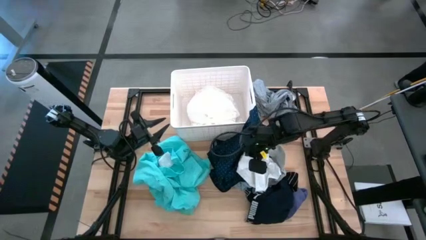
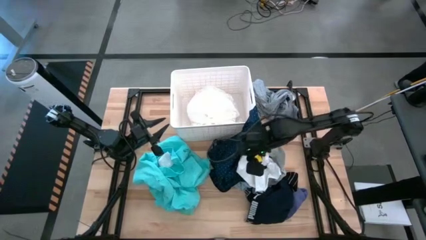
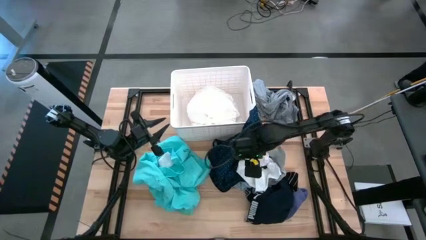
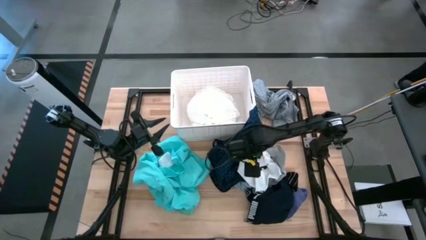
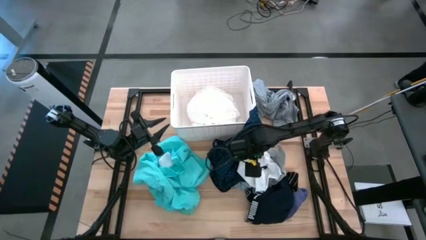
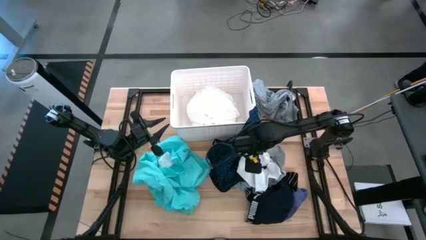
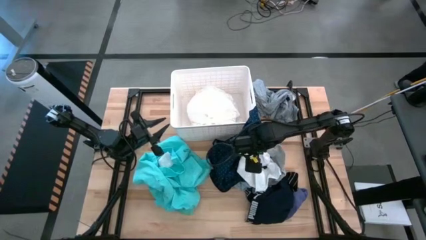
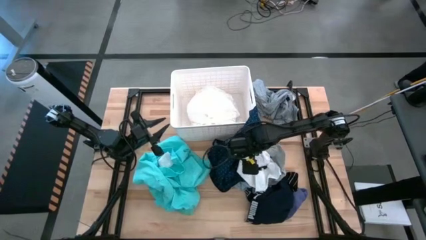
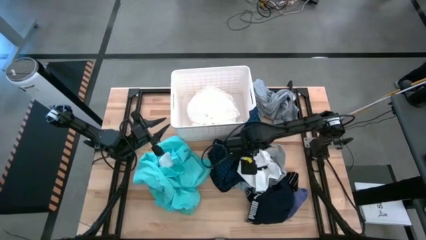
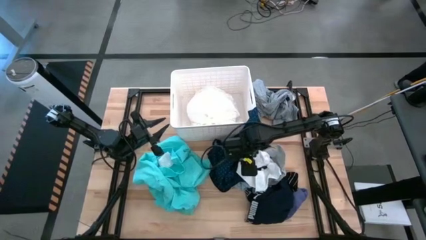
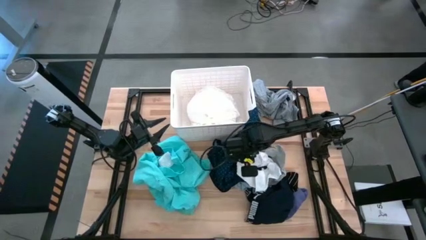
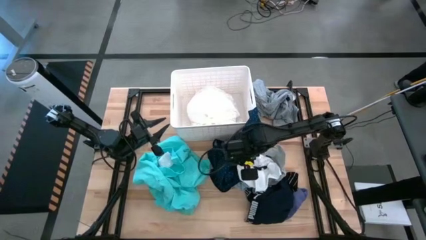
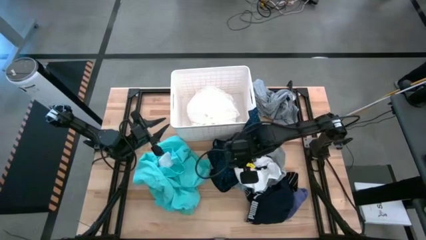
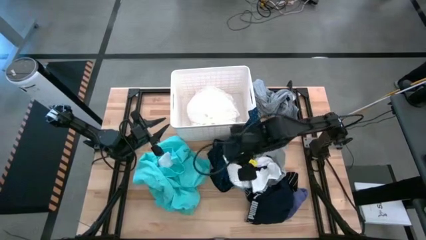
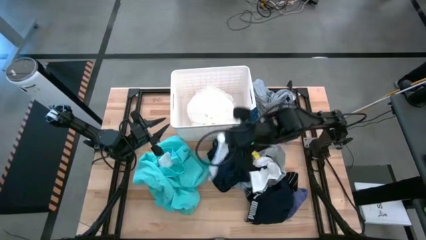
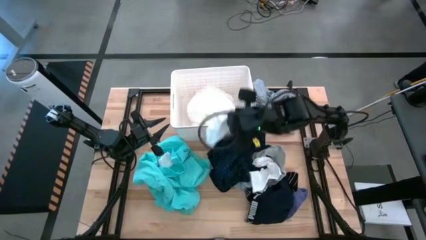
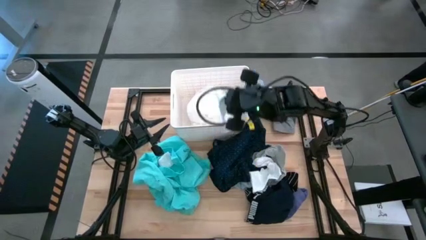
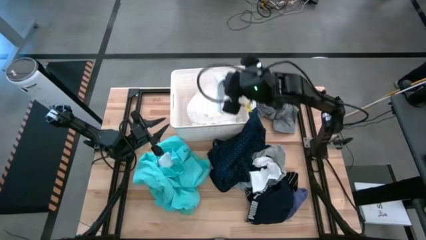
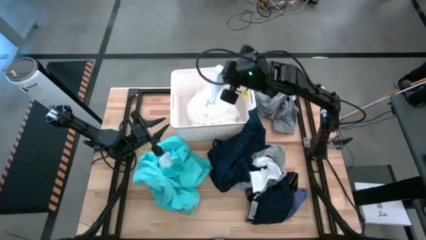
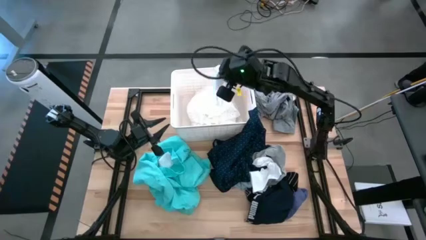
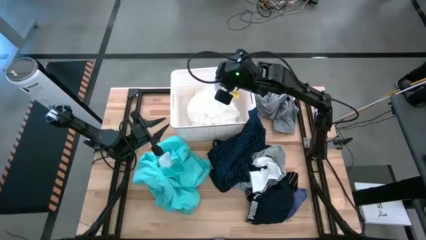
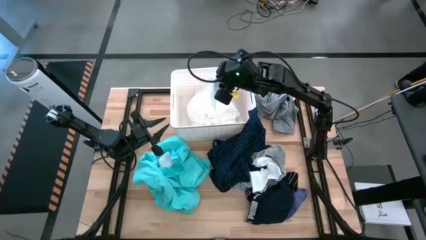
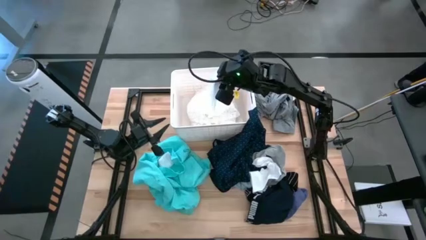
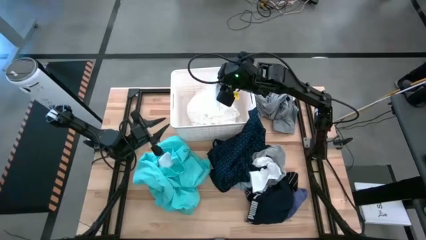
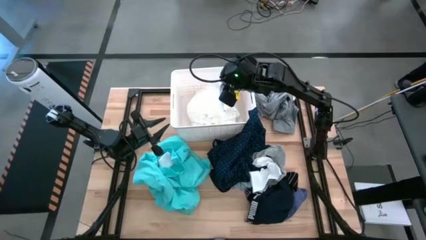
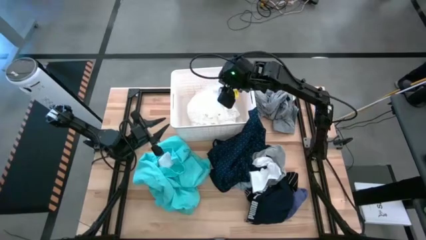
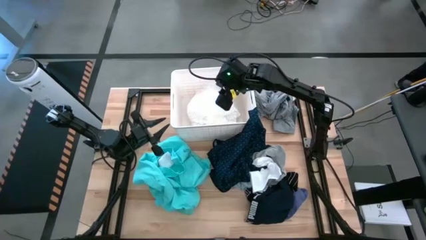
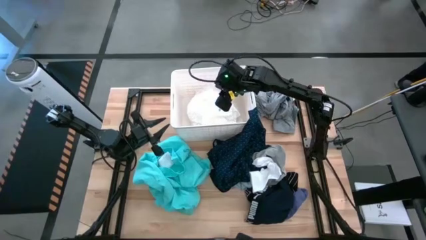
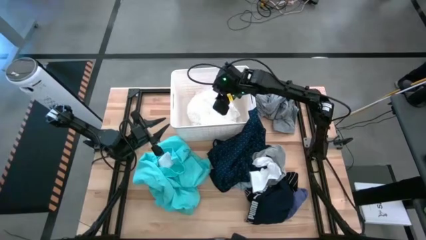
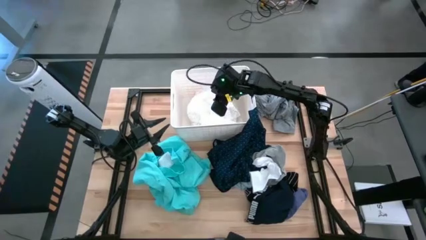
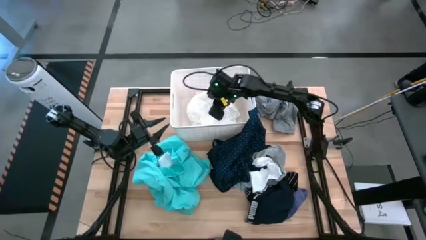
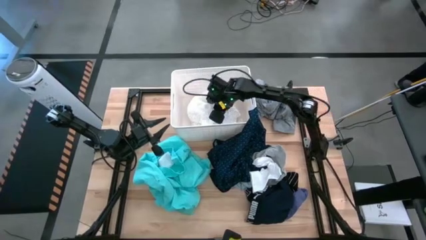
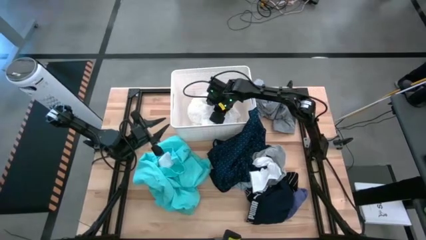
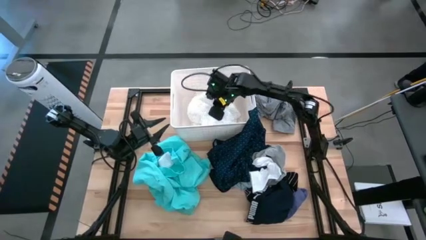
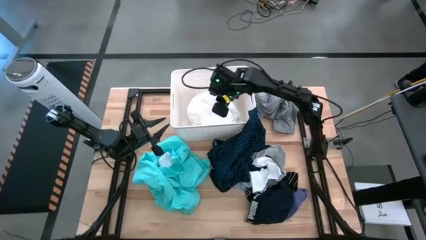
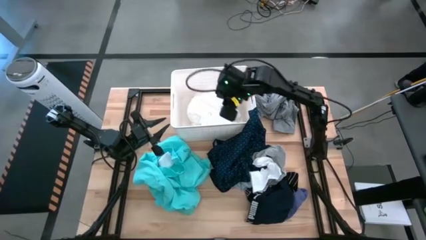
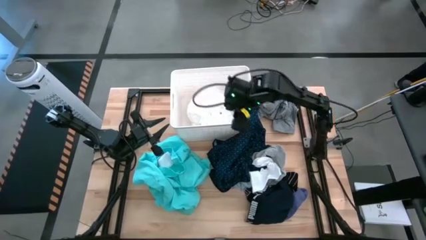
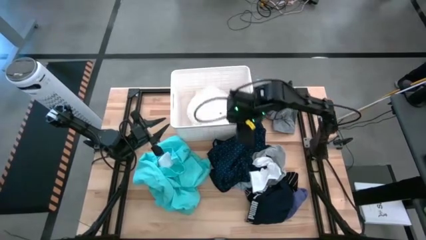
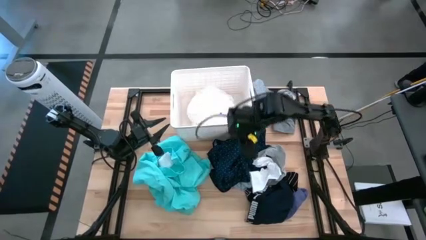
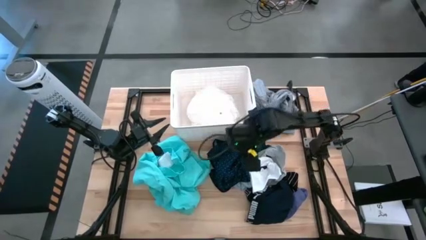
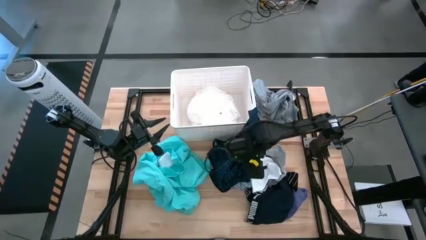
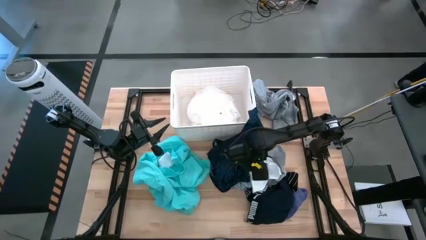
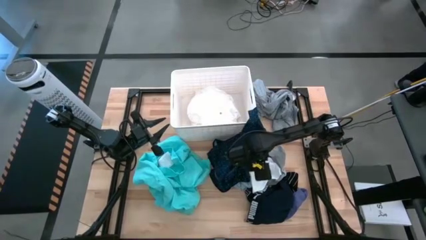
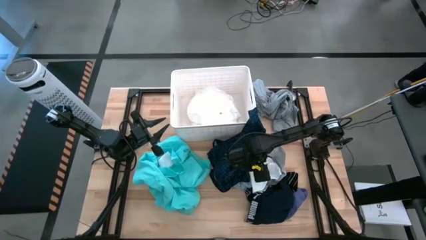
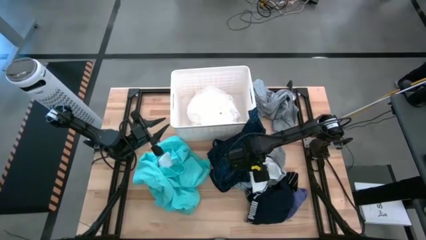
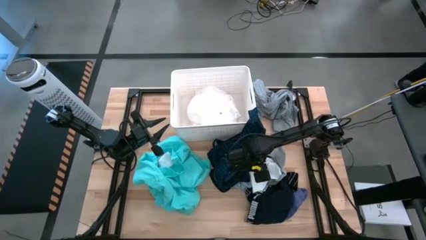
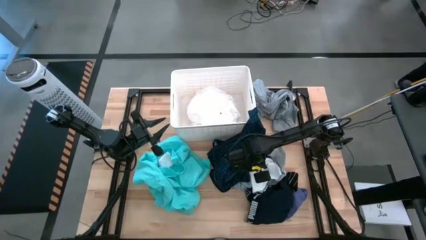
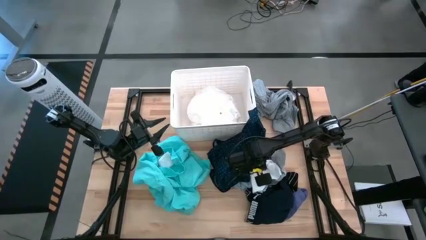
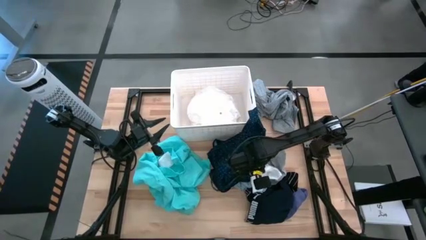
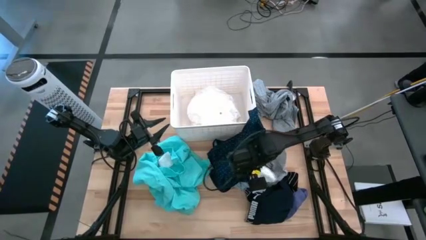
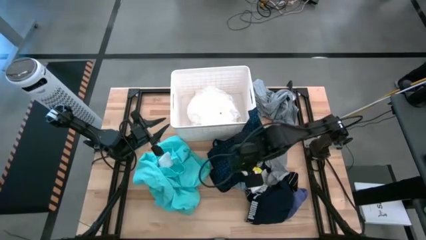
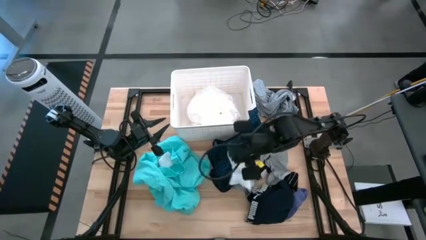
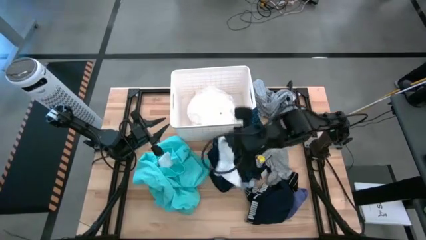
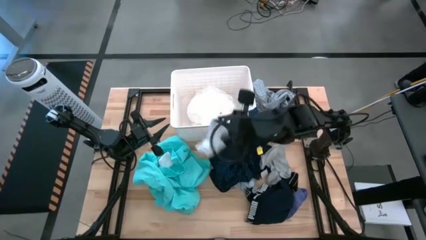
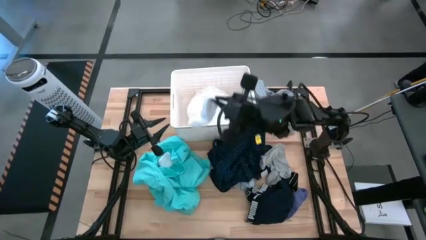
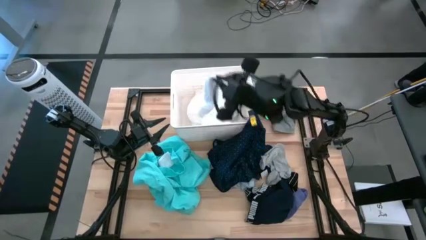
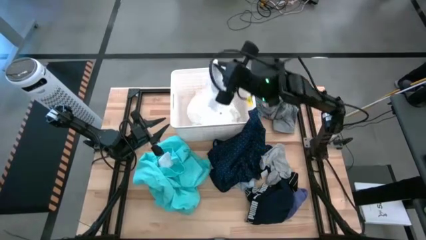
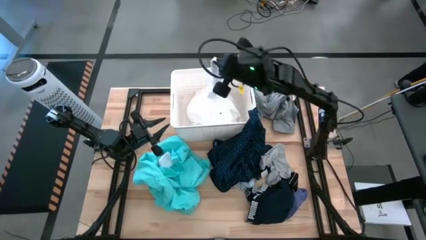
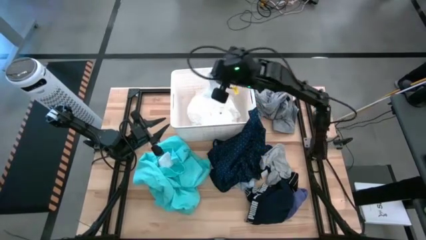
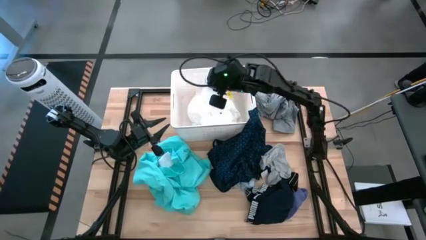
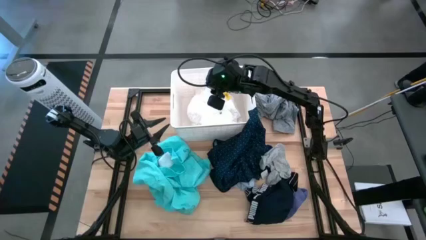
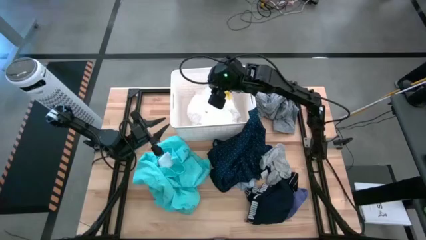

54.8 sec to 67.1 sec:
Task: Sort clothes
Put the white sock into the white laundry bin

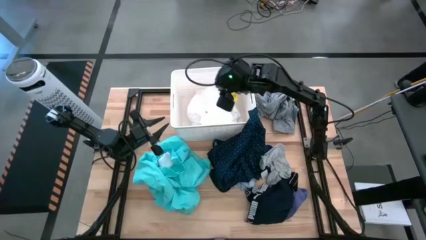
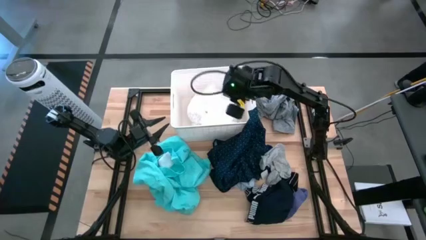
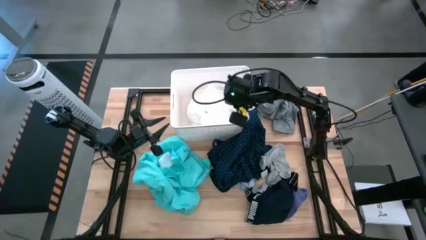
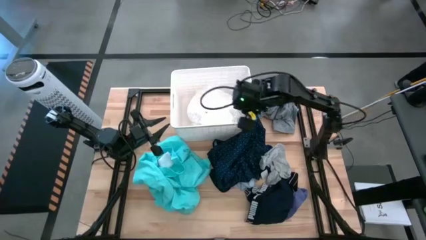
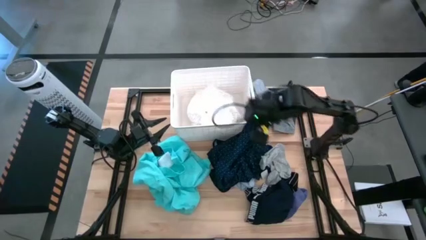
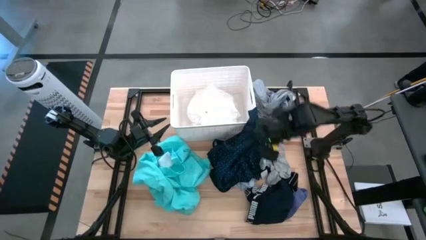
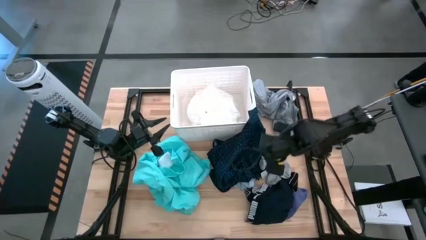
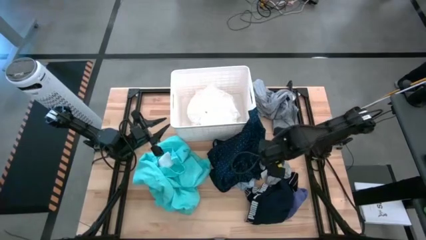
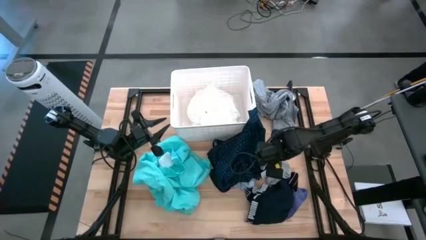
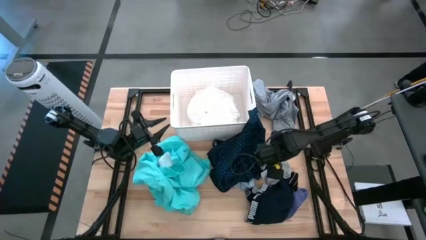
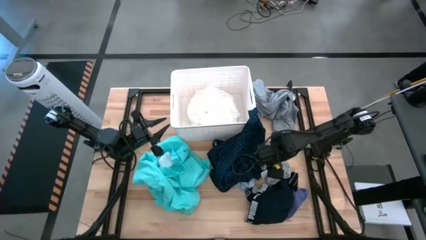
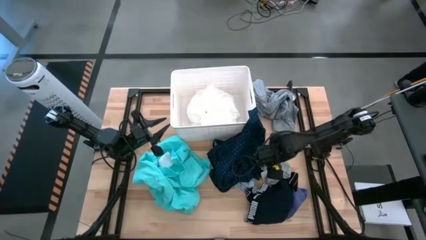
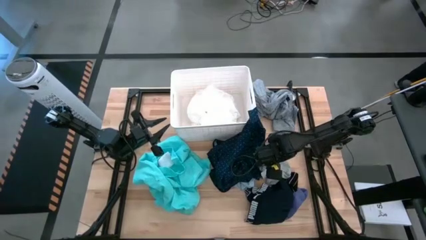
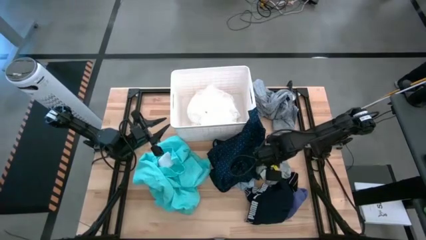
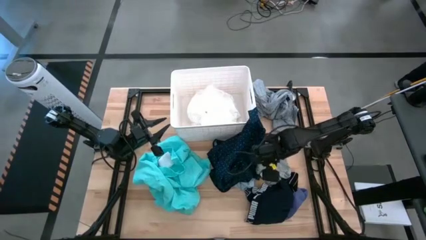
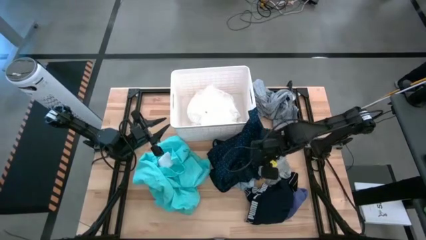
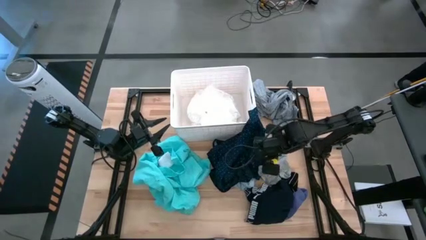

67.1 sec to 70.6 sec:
Put the gray sock into the white laundry bin

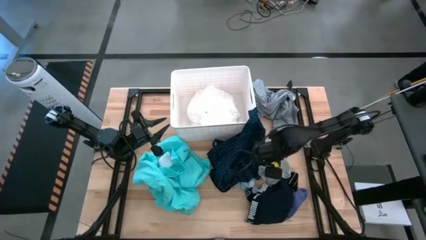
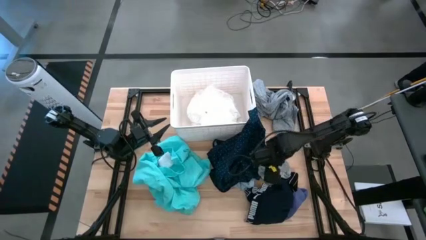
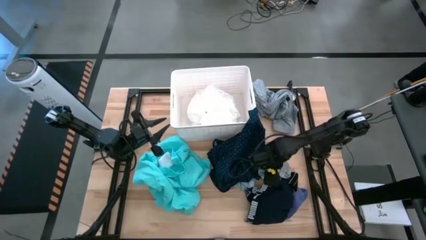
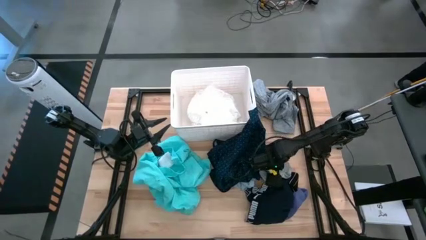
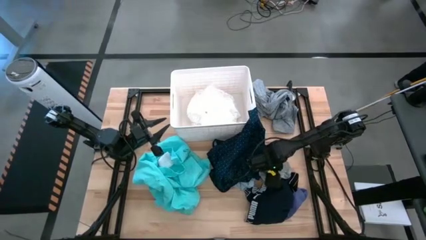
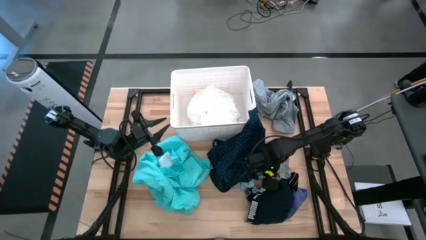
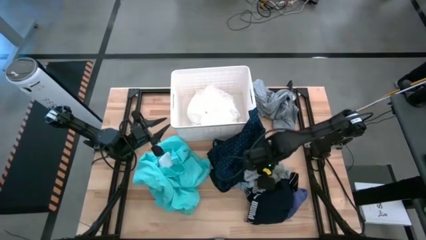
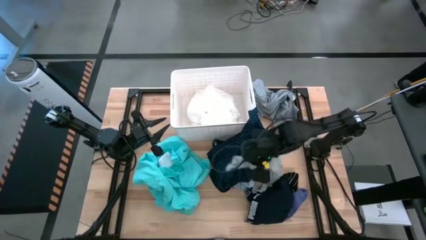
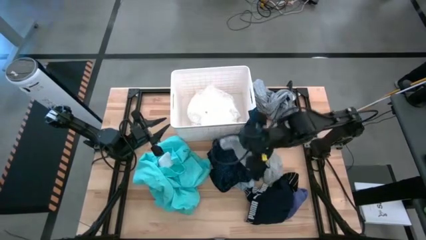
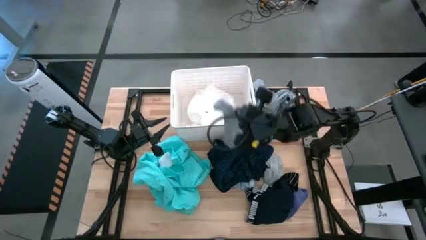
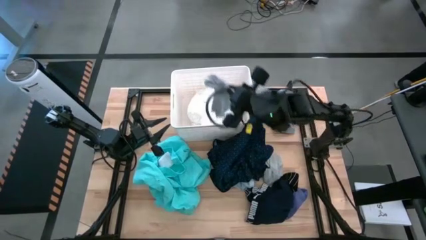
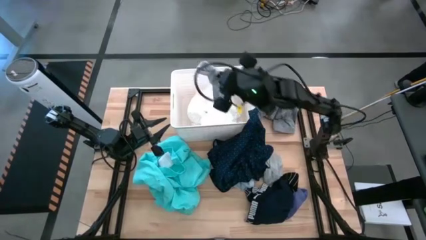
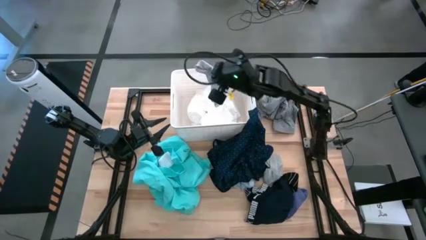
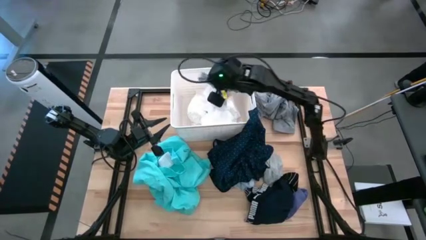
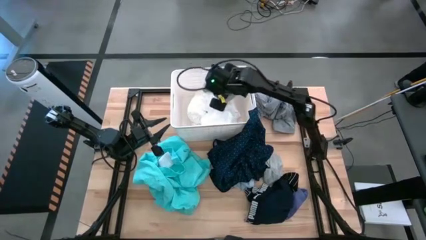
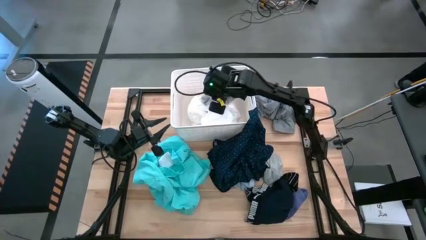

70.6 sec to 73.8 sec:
Put the gray sock into the white laundry bin
